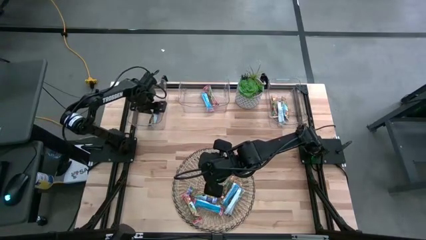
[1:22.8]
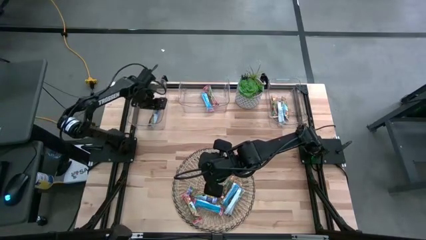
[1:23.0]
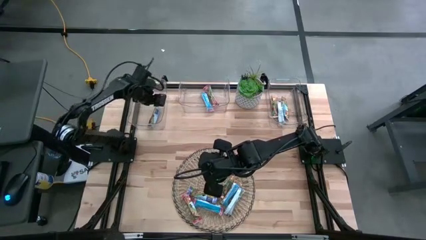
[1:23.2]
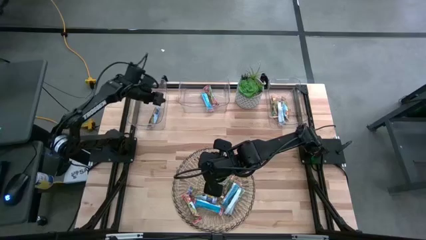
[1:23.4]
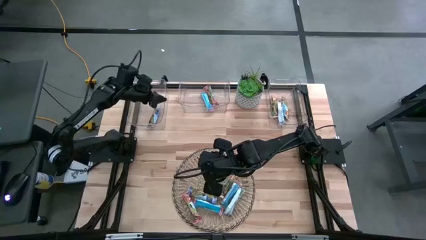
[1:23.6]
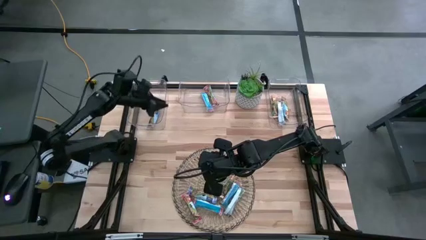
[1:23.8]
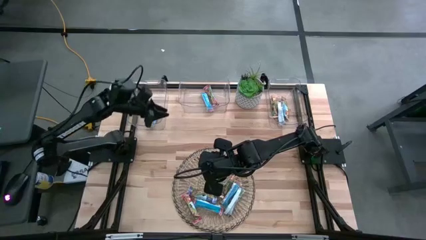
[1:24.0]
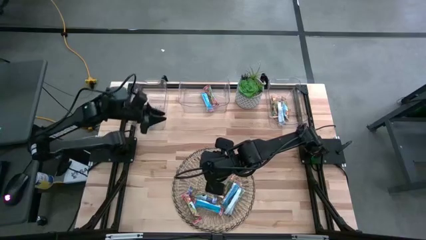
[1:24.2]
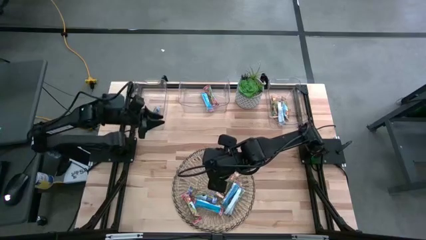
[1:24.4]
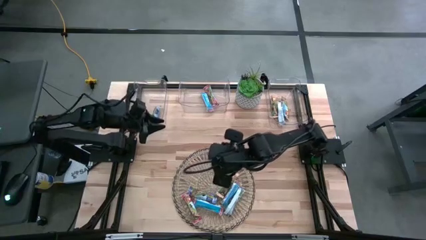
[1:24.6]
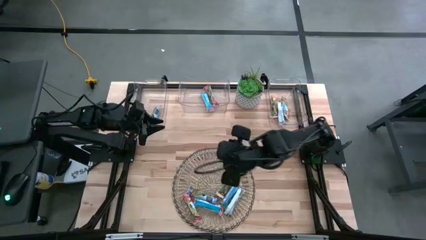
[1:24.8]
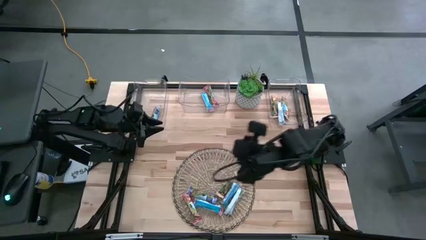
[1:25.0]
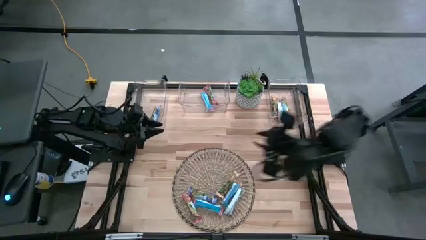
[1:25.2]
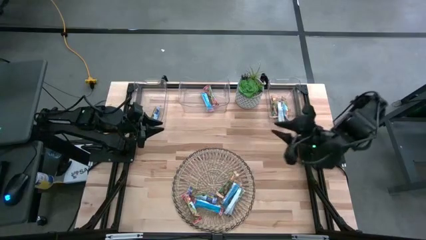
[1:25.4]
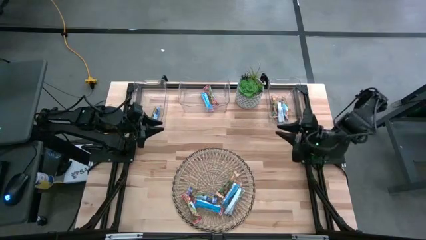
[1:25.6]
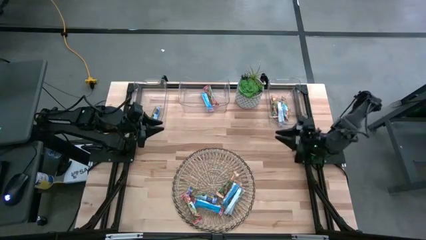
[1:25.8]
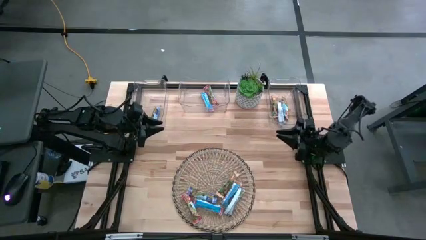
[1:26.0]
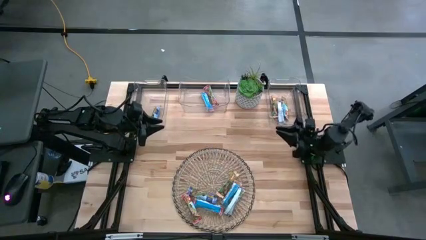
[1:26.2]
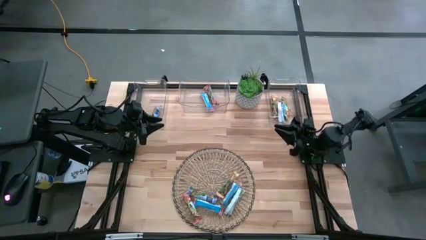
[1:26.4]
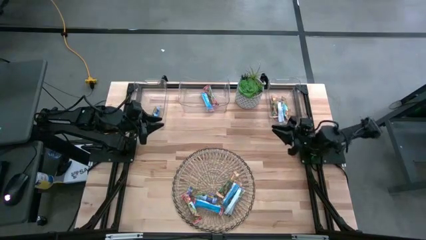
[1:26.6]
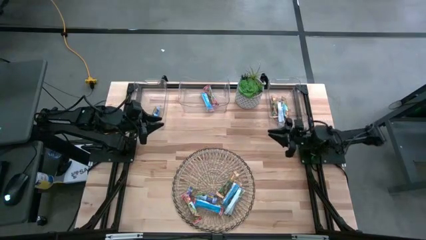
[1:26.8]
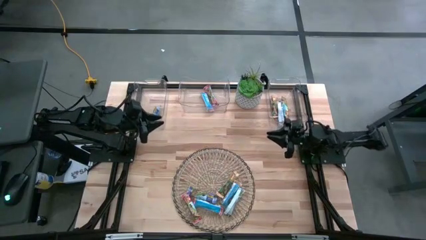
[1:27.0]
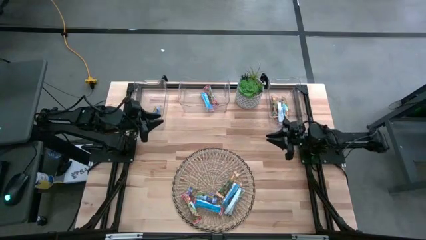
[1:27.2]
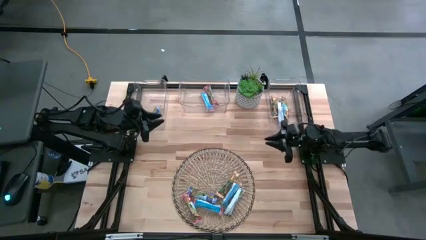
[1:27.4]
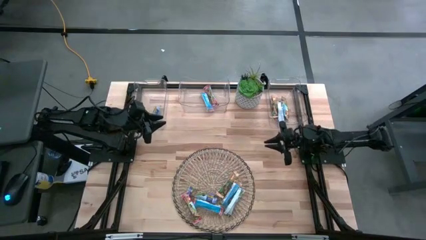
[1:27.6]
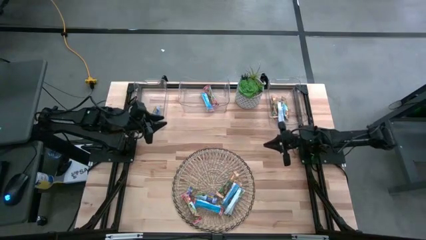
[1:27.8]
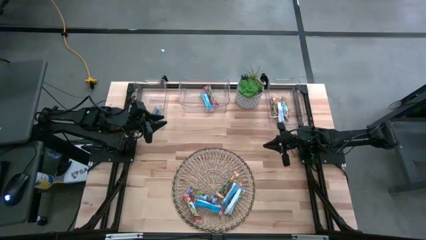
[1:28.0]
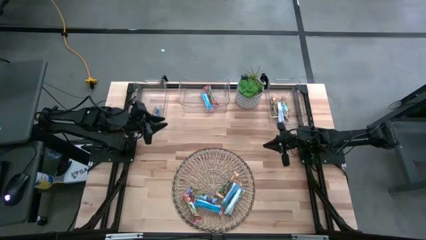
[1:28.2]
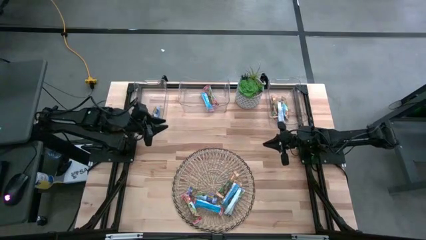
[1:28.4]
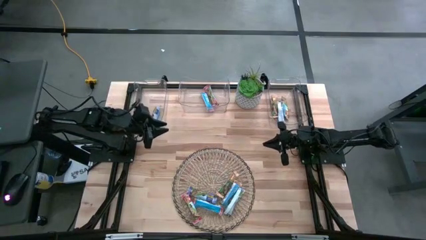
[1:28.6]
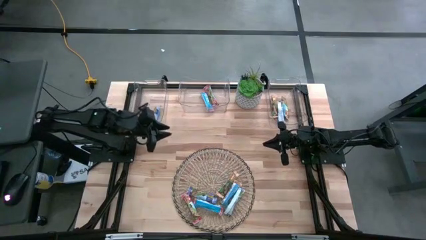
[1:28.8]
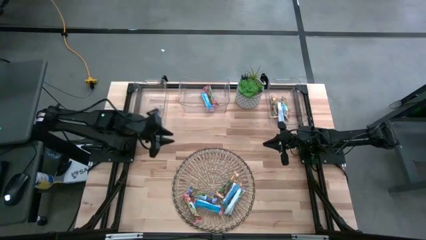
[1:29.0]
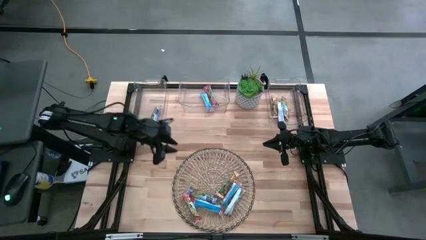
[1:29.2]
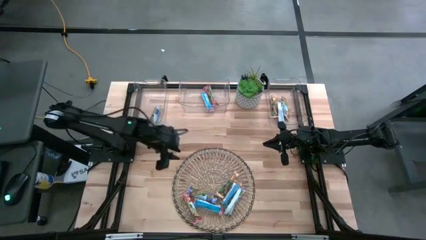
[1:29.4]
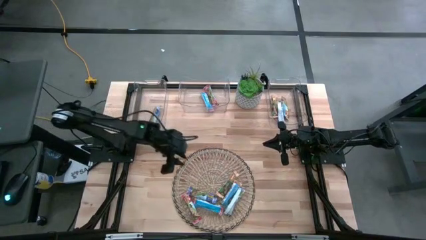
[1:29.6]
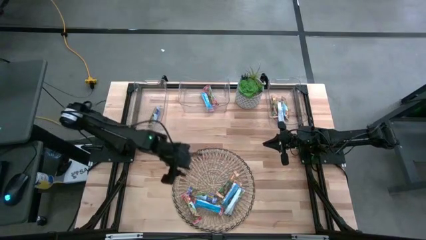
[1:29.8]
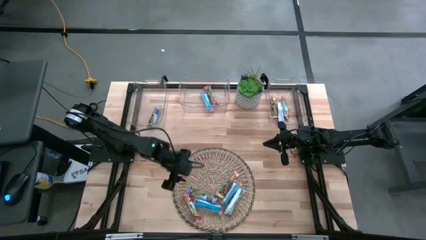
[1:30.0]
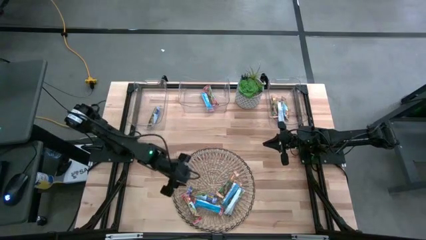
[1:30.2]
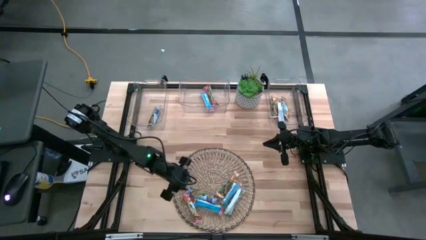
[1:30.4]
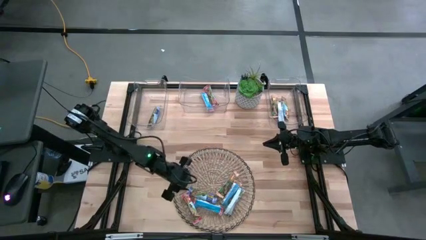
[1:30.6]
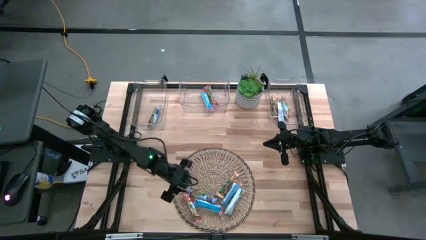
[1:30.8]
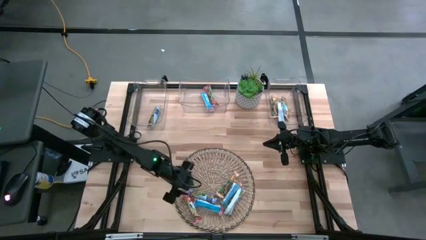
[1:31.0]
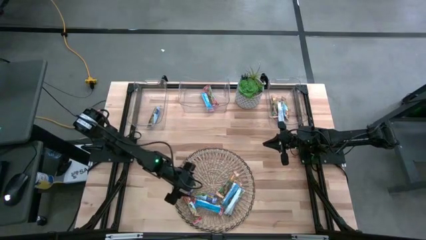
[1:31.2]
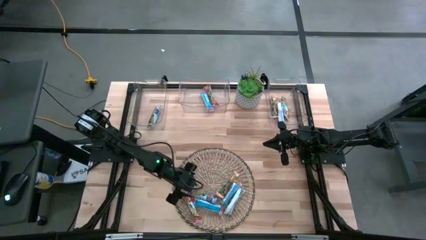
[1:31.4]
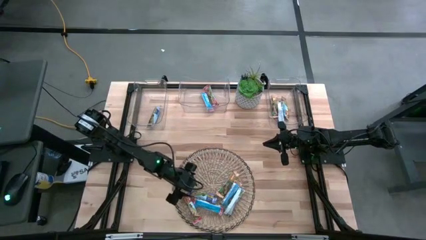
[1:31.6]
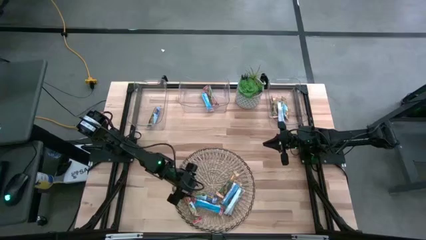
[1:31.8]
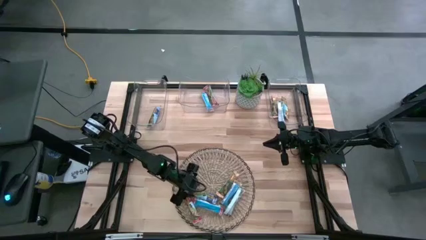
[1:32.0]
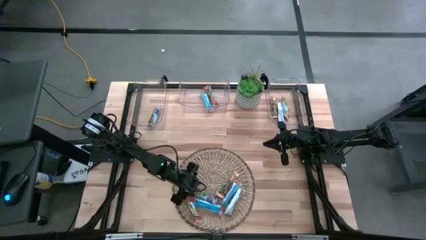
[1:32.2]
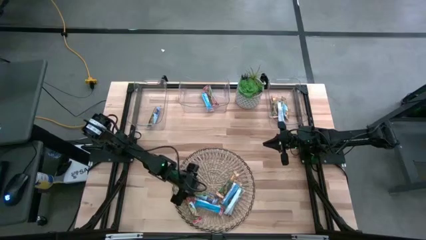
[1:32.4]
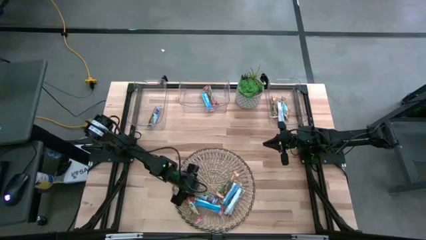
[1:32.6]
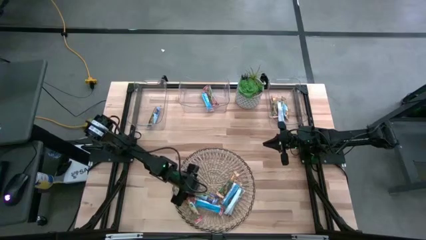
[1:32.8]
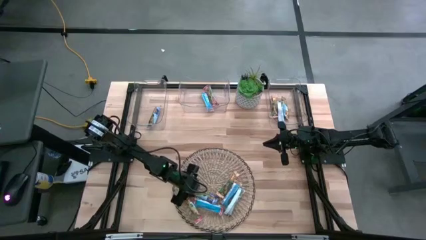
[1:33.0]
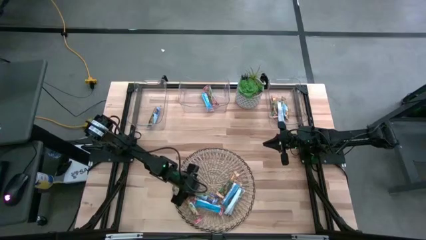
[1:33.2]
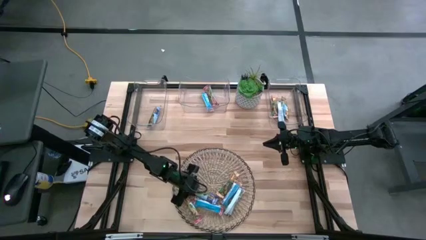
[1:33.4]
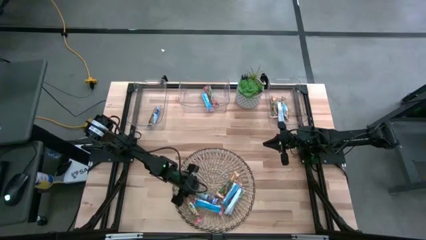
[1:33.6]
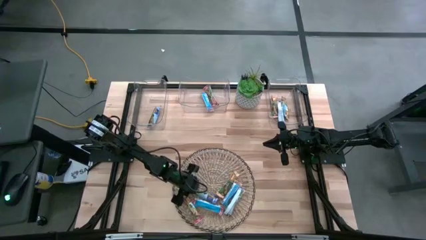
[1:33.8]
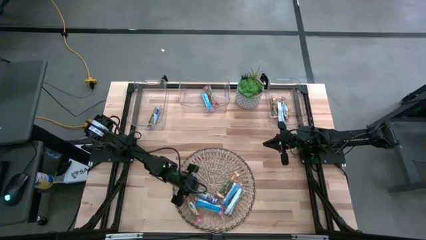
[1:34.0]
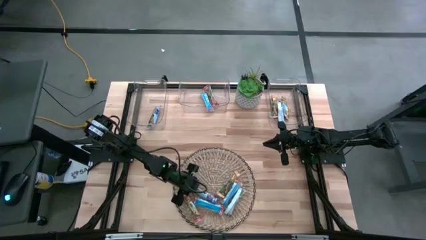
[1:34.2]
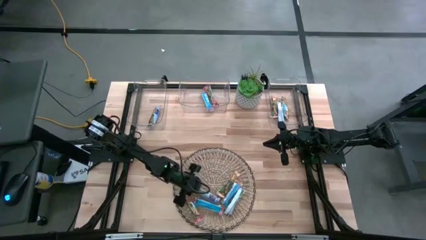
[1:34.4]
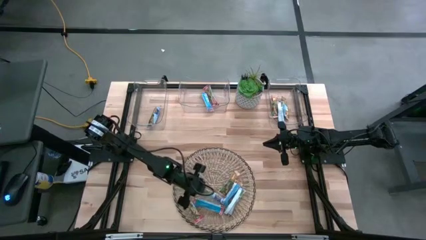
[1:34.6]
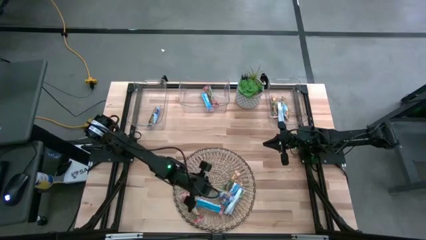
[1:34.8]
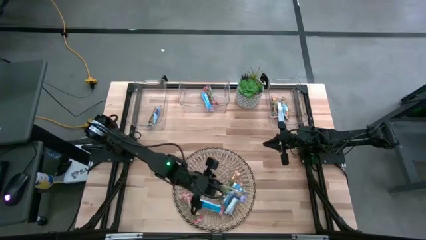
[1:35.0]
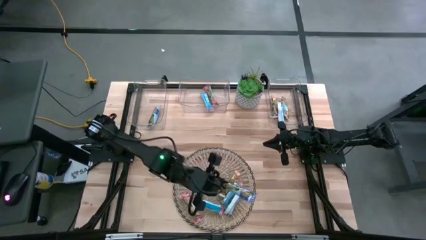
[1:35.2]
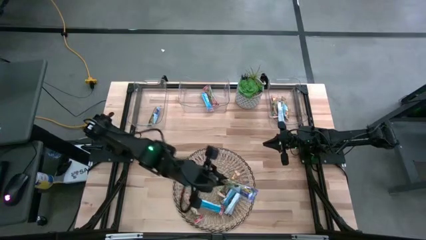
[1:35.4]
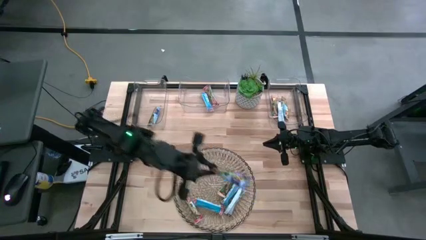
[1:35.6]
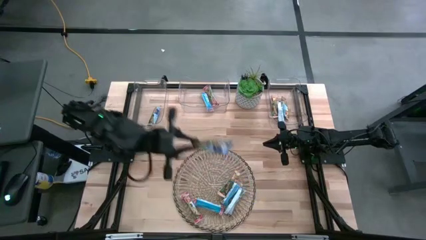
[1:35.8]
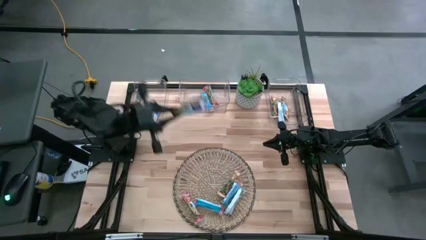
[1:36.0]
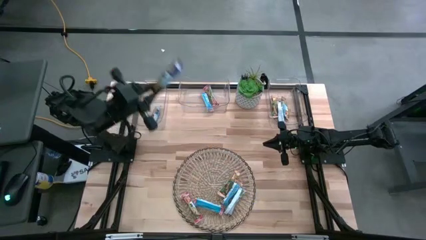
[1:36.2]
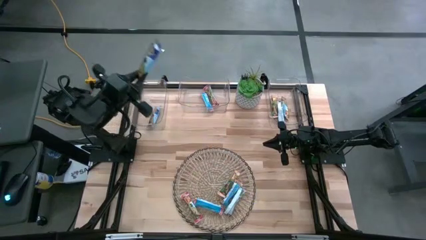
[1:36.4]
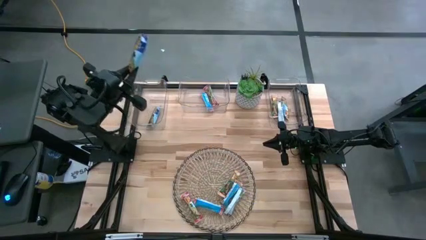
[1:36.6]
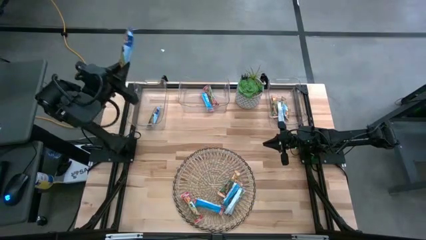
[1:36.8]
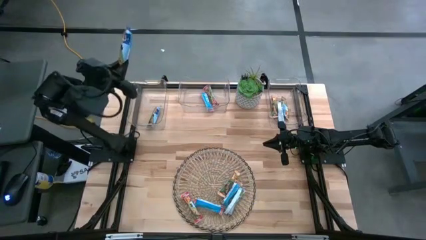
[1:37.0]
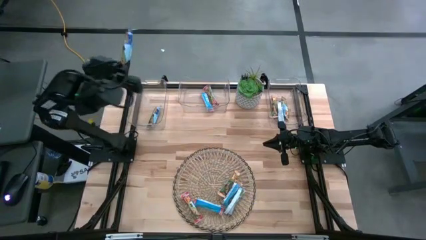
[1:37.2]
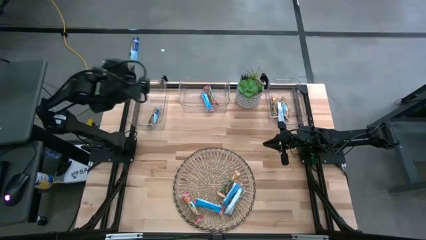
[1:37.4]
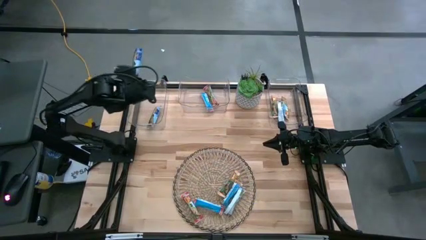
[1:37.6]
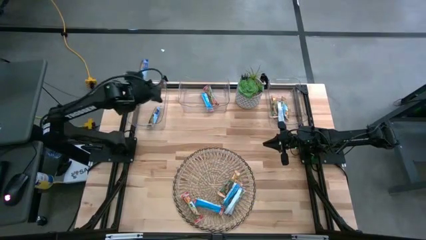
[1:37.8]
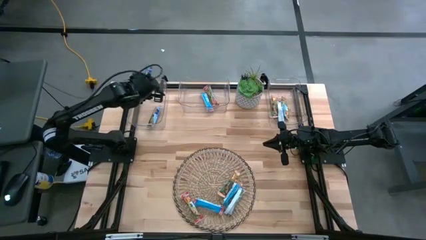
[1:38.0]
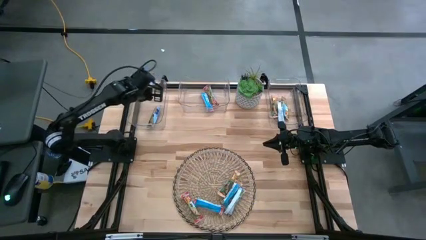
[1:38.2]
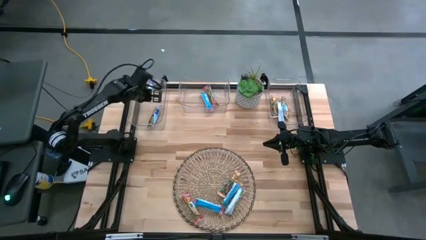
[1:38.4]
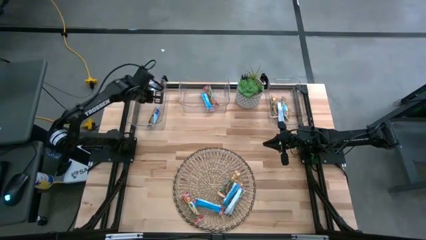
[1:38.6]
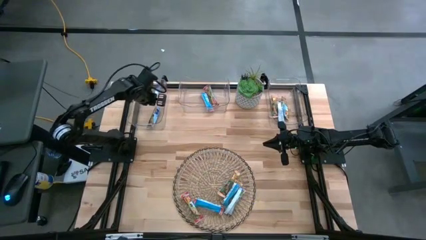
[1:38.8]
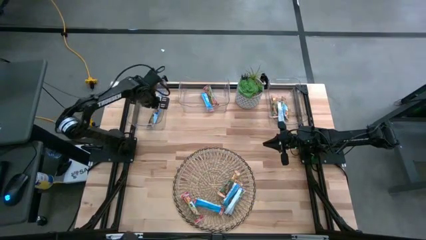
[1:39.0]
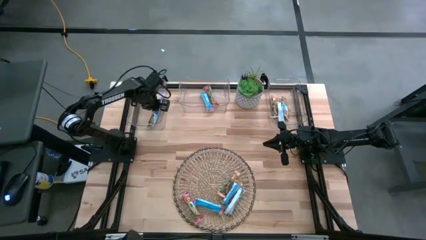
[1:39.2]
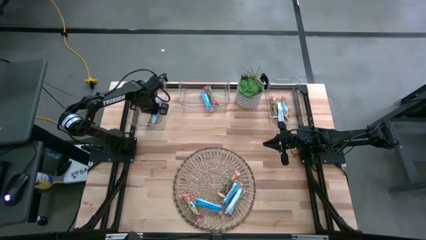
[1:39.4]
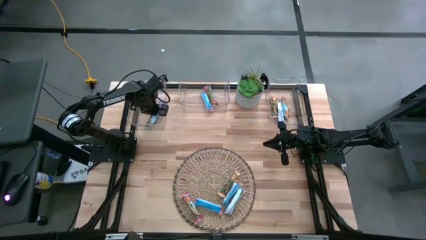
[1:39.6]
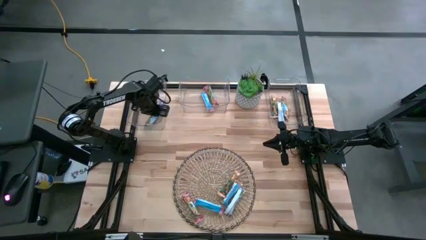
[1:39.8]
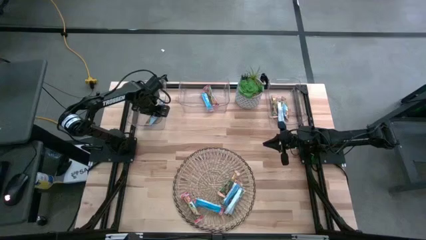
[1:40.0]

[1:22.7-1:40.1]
Task: Pick and place Granola Bars by type
Put the blue granola bar into the left transparent bin
